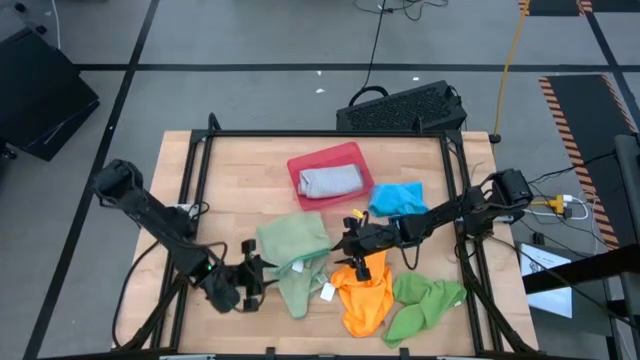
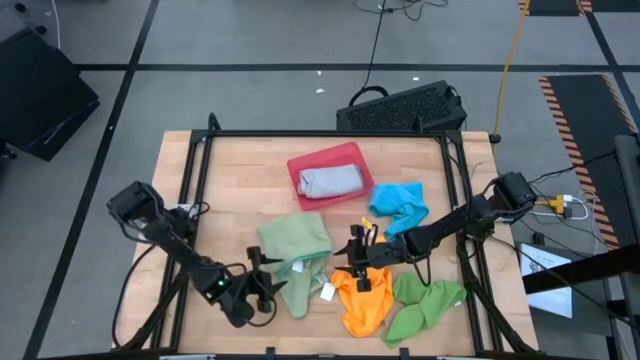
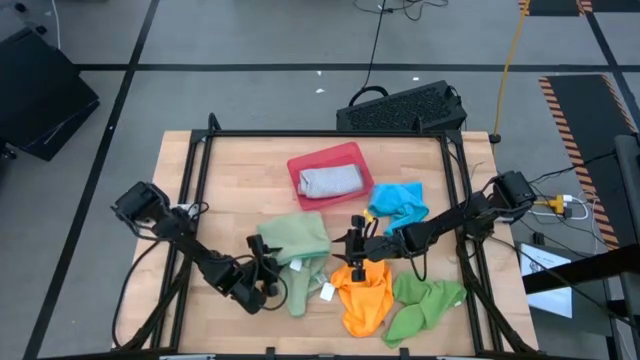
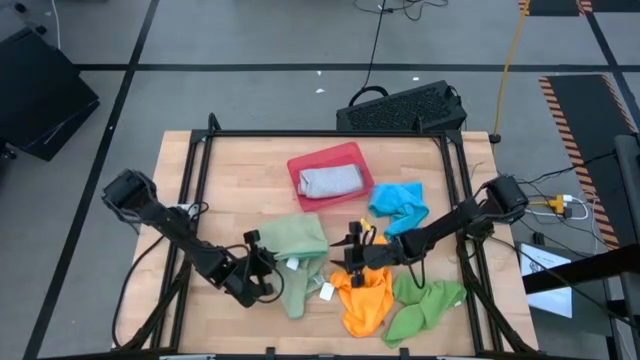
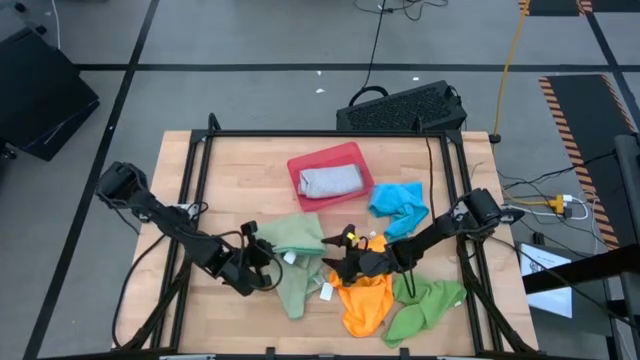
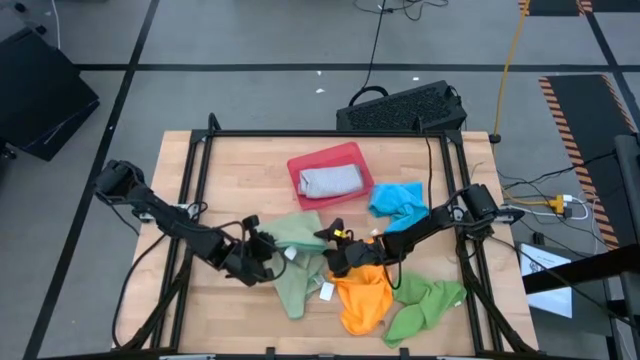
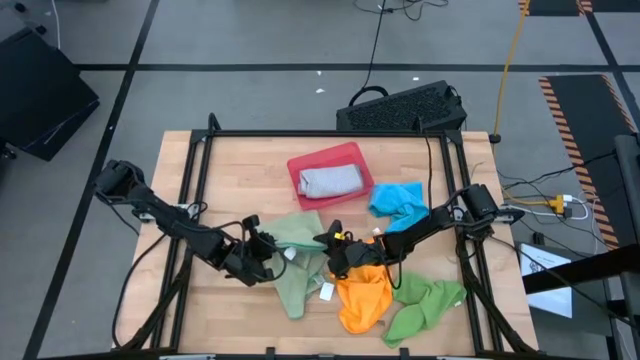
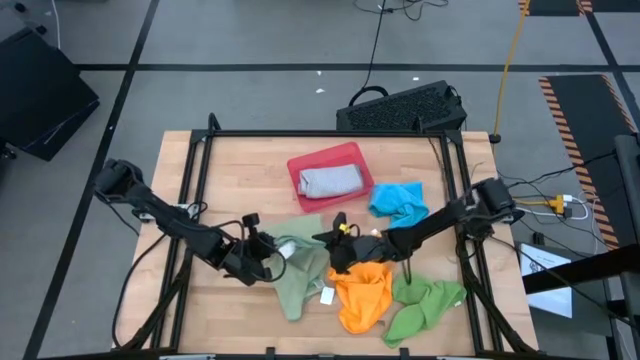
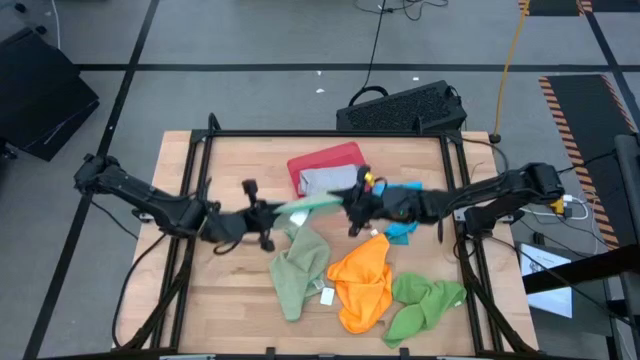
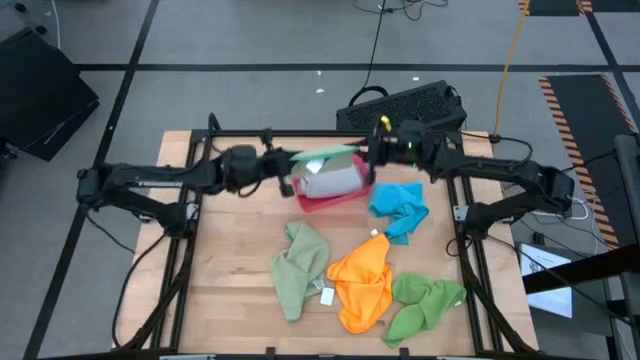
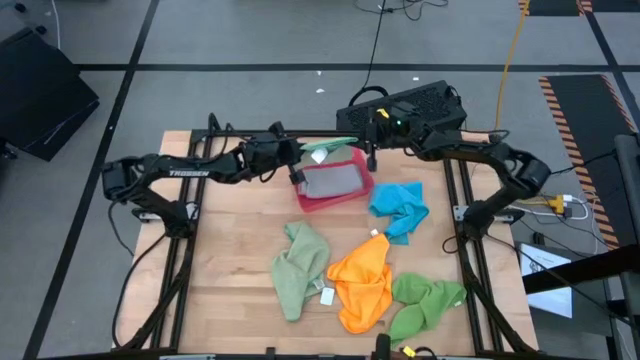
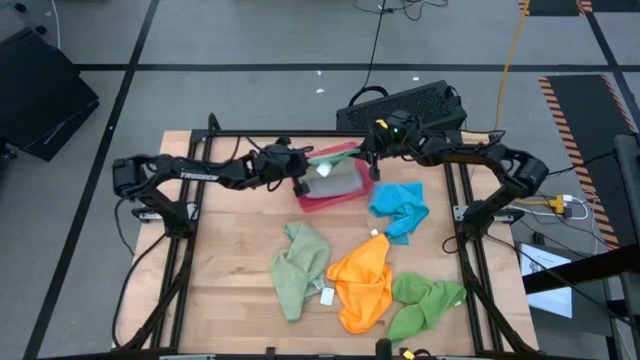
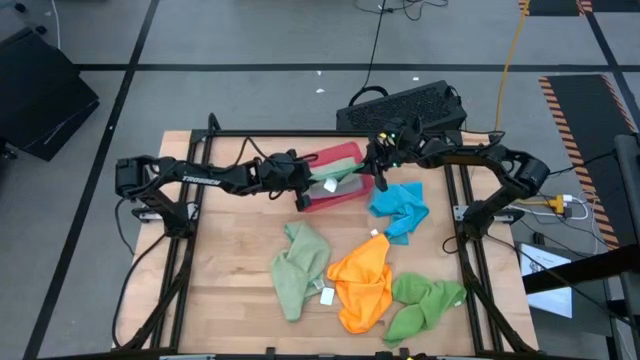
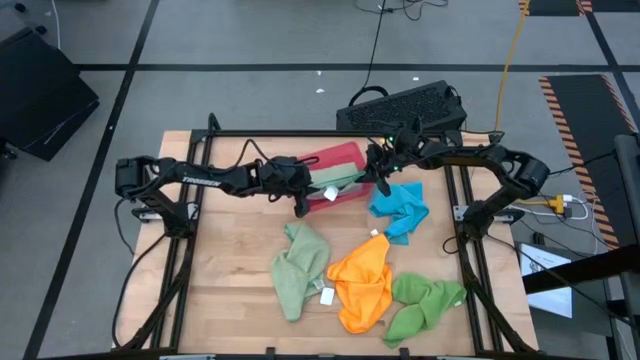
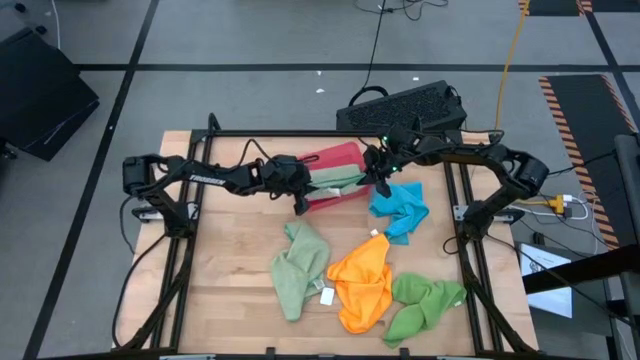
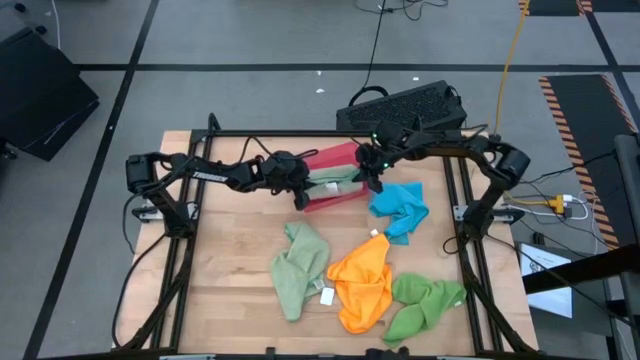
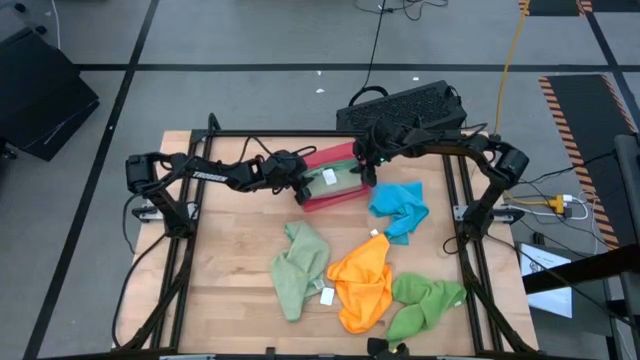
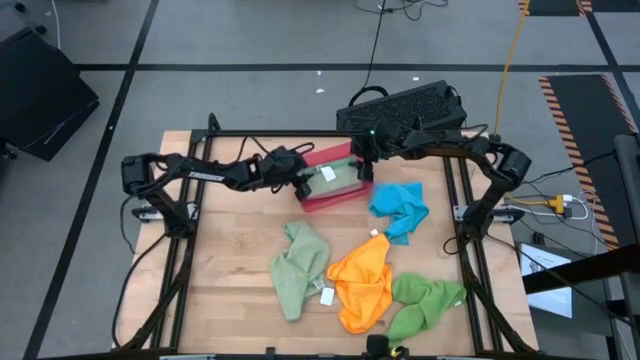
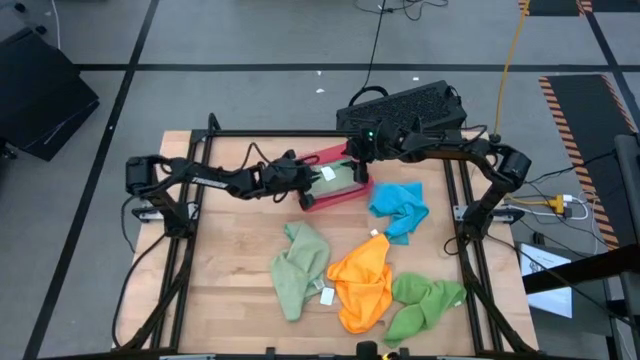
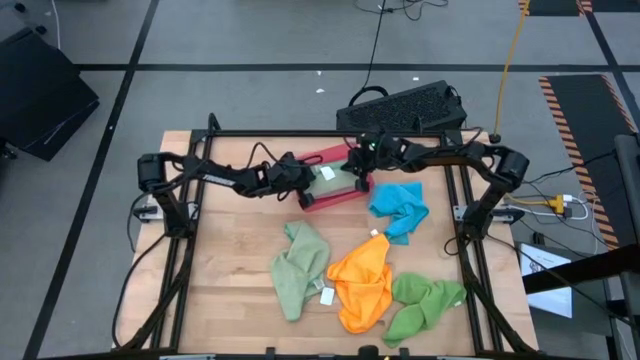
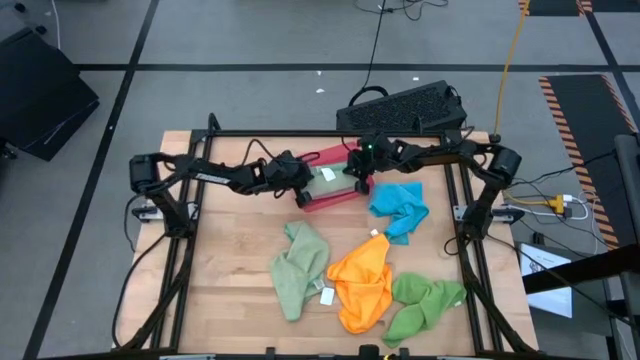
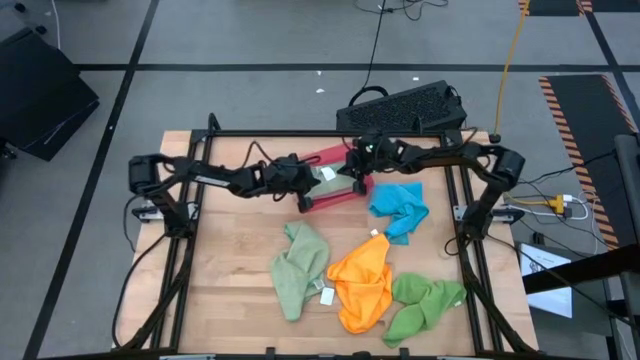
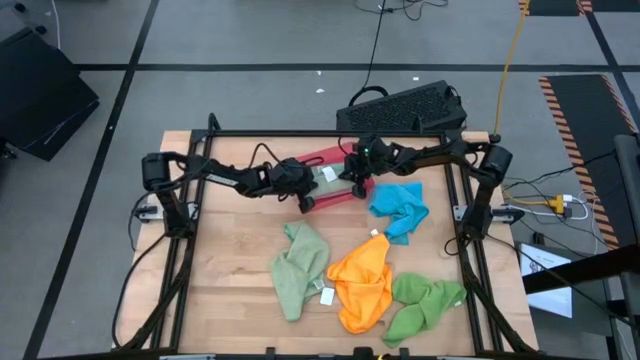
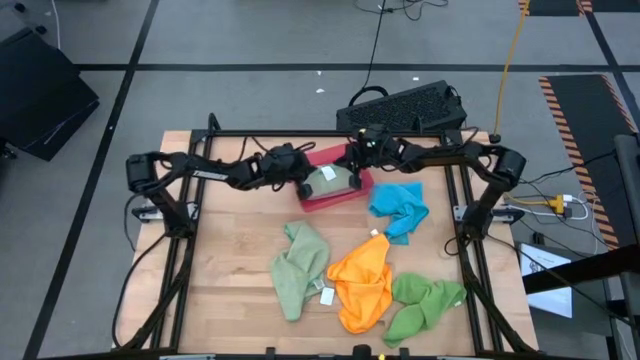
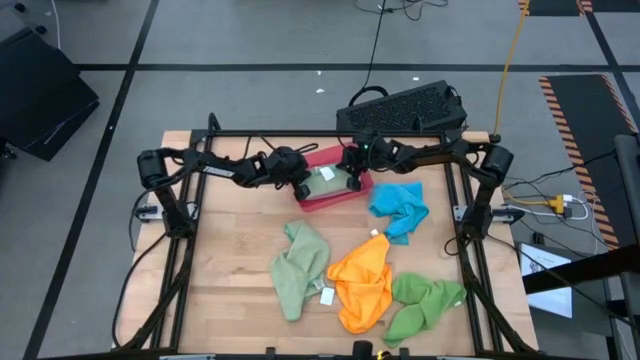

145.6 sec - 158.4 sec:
Task: Fold microfiber towels
Put the folded light green cloth into the red bin
